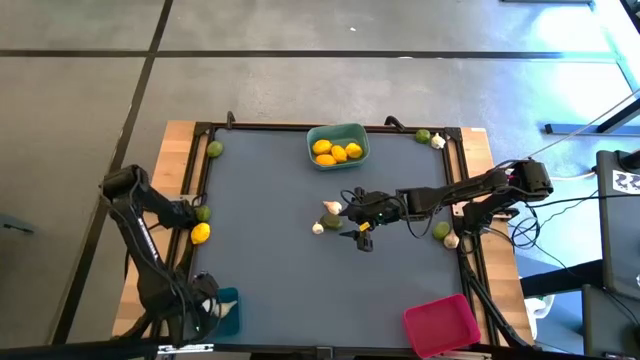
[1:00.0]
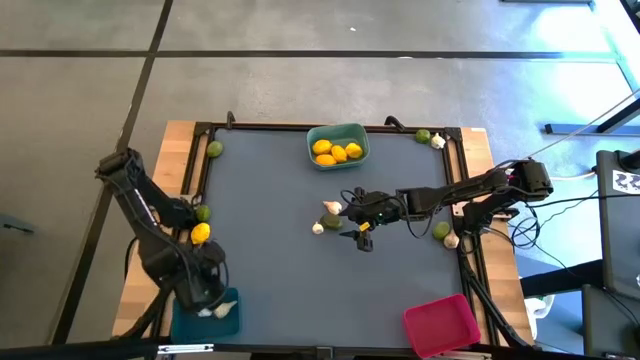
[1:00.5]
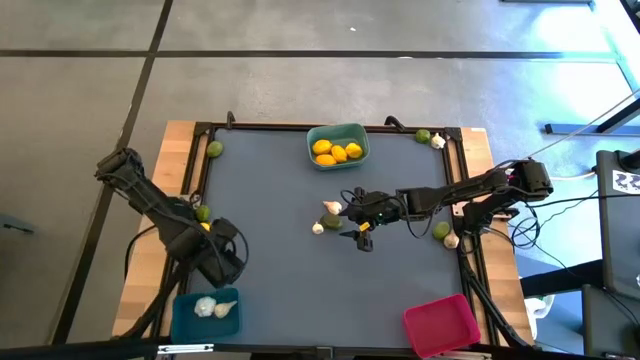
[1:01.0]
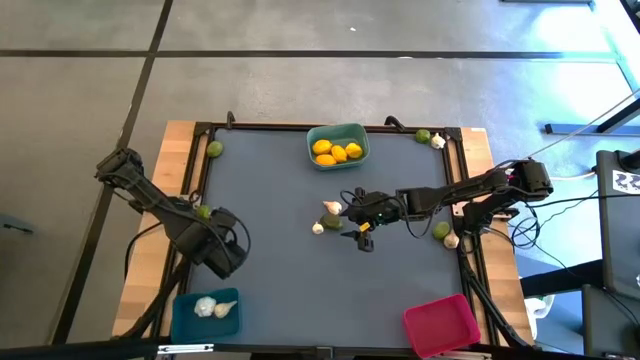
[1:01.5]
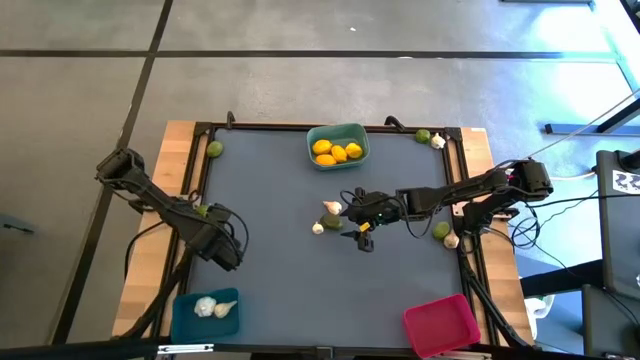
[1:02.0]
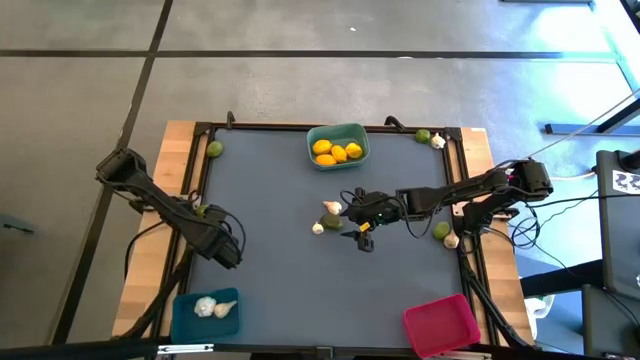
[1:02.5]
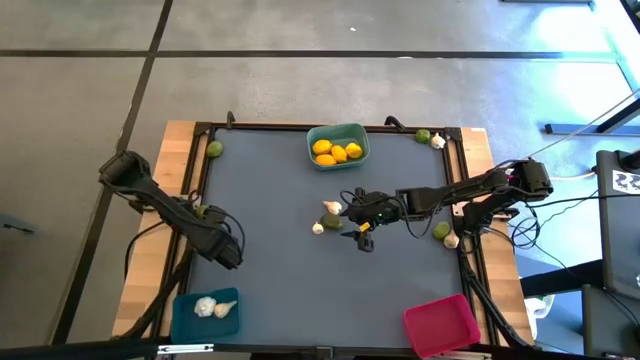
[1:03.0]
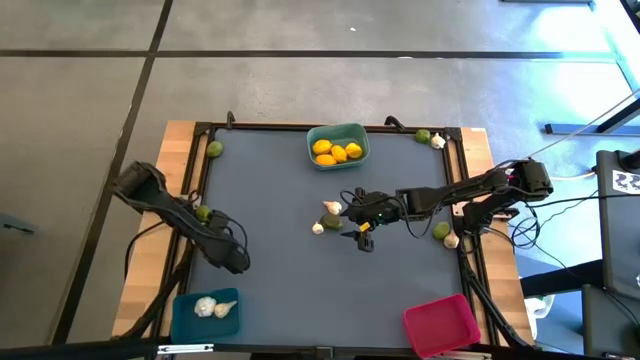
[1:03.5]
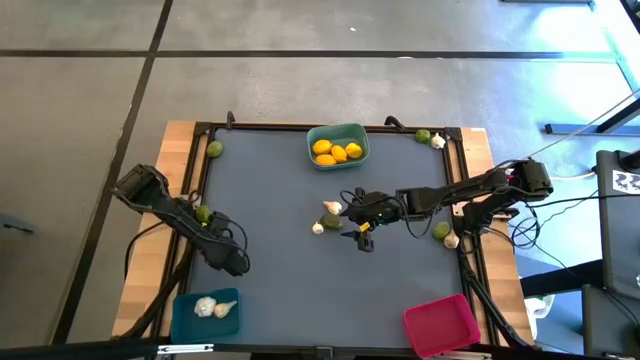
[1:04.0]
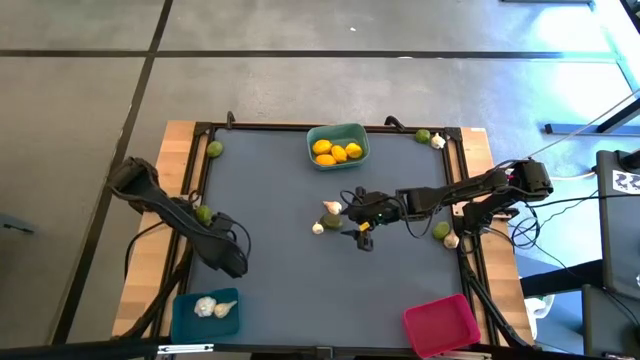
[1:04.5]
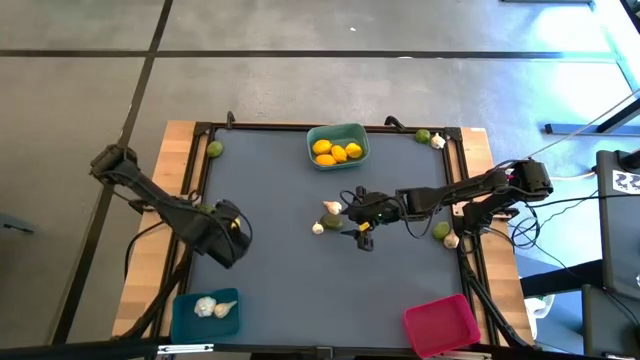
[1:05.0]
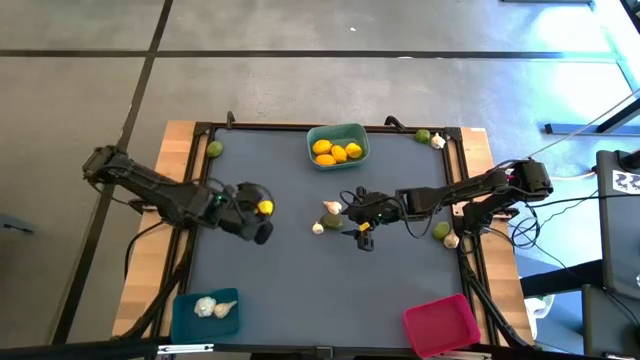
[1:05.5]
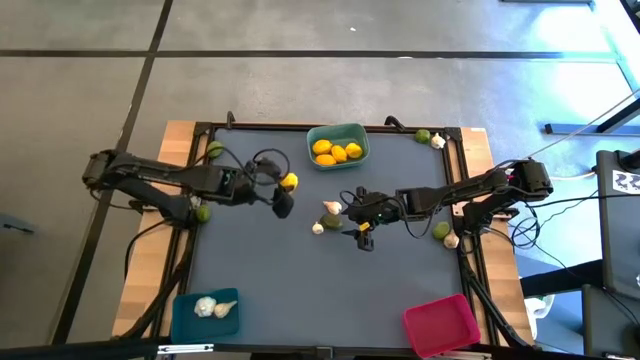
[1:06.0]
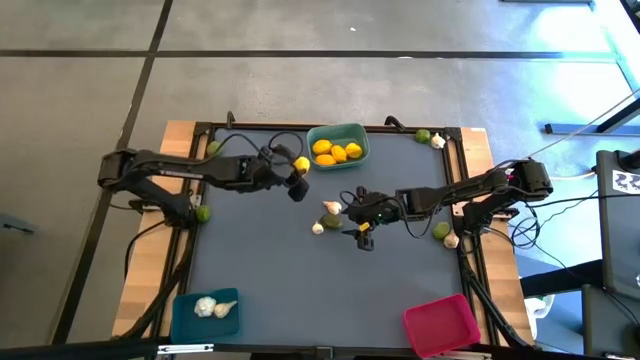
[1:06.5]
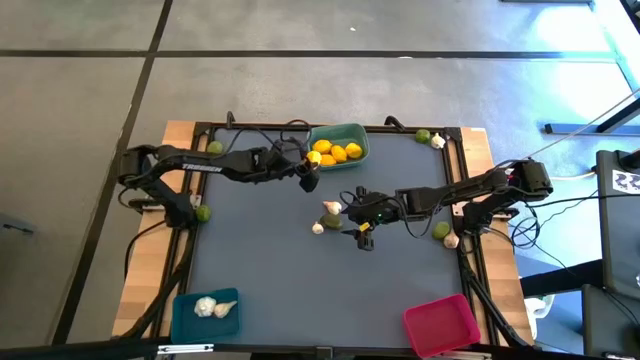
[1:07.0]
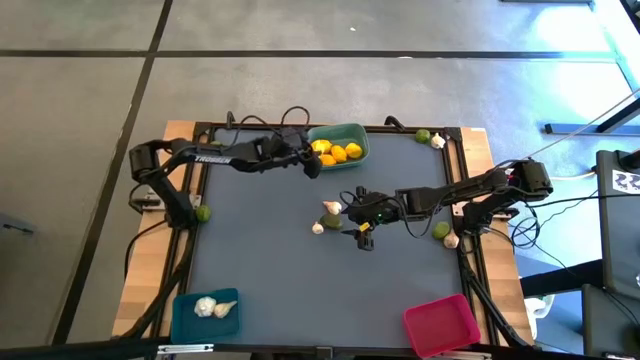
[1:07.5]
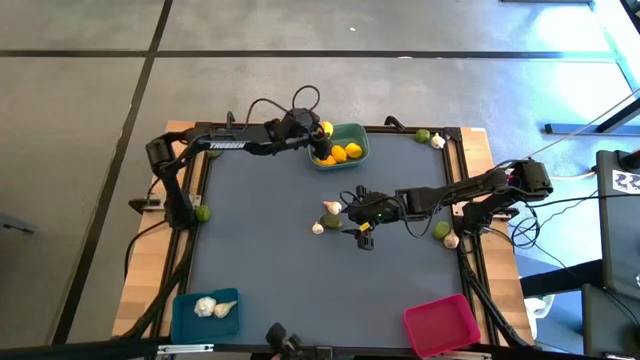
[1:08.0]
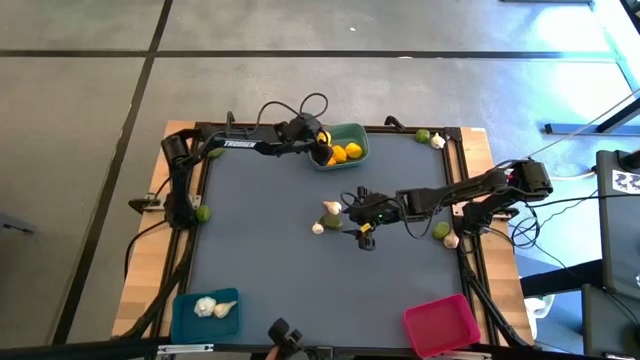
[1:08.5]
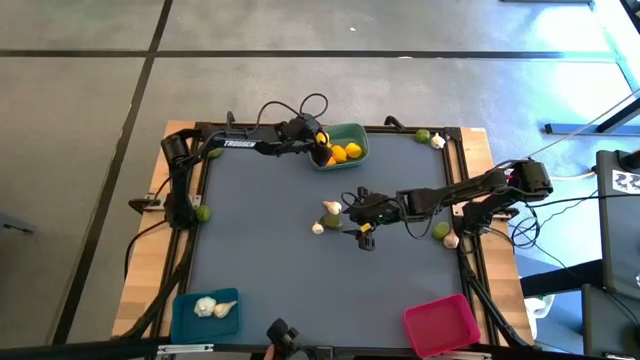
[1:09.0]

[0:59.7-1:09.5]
Task: Sort produce into baskets
Put the green lemon into the green bin

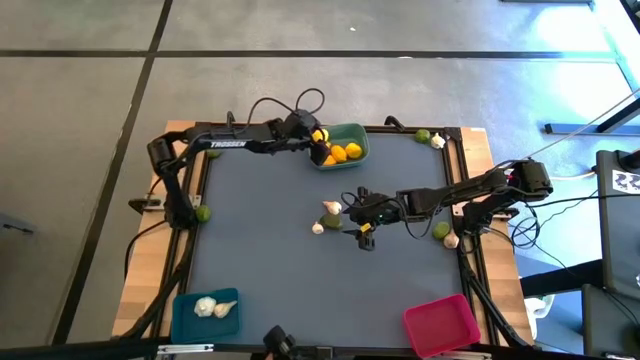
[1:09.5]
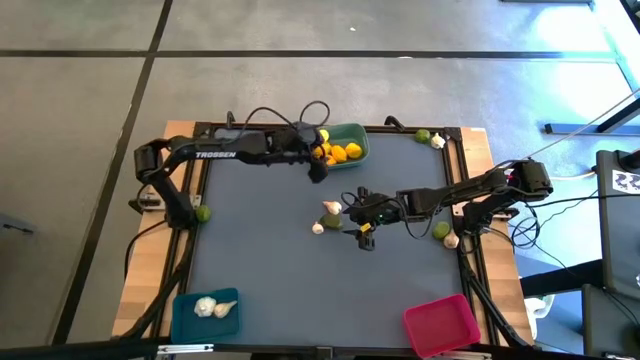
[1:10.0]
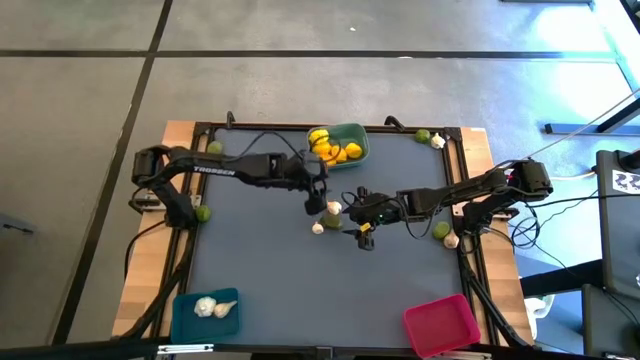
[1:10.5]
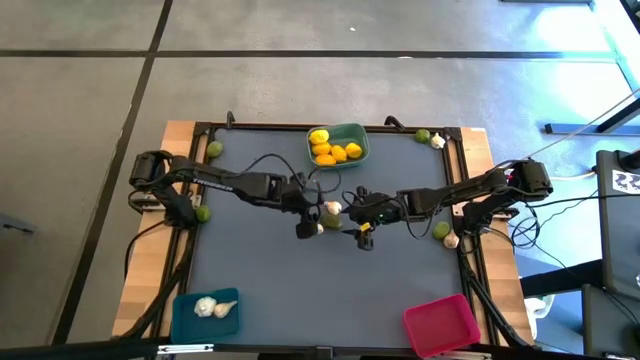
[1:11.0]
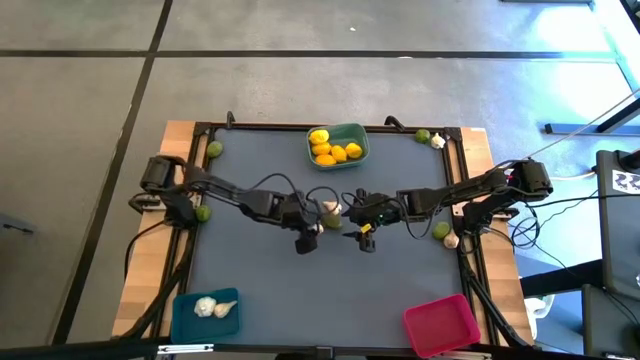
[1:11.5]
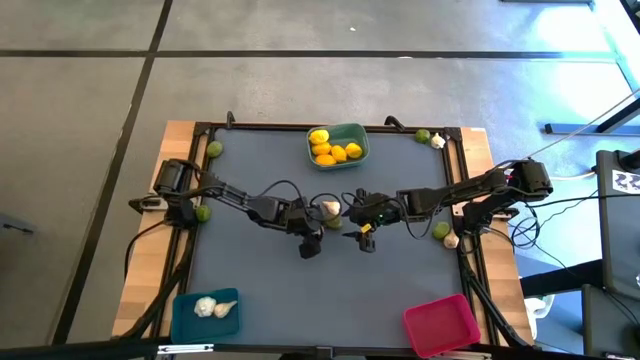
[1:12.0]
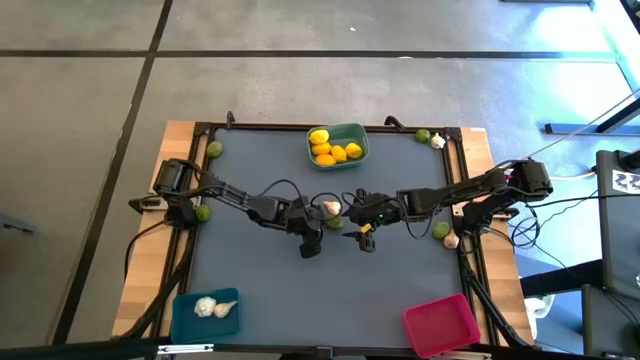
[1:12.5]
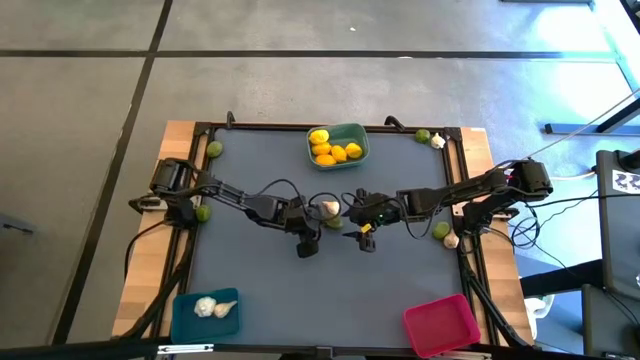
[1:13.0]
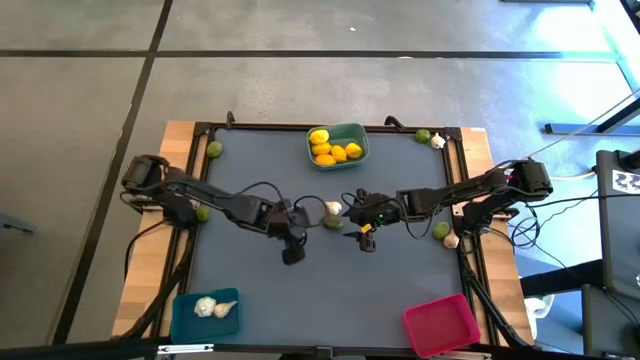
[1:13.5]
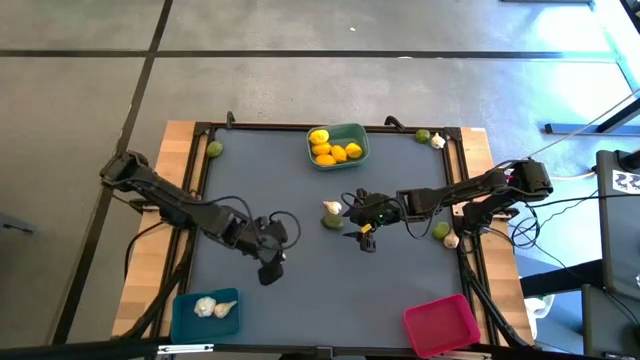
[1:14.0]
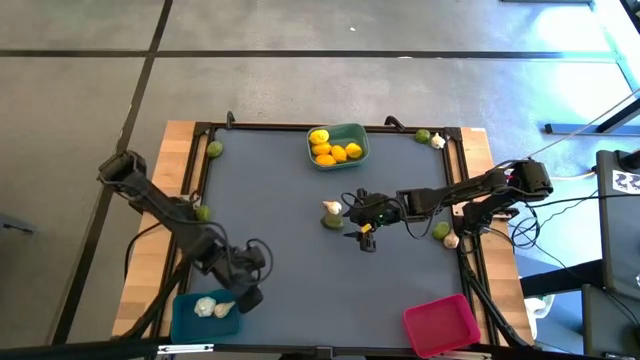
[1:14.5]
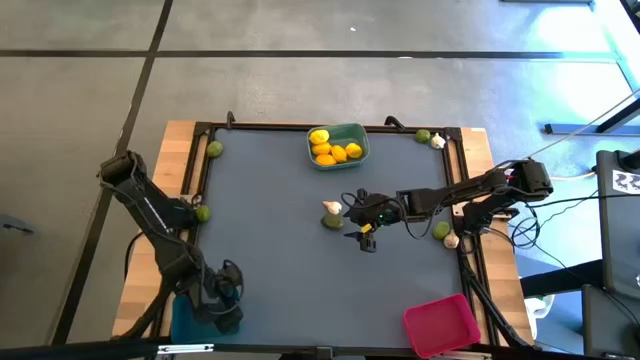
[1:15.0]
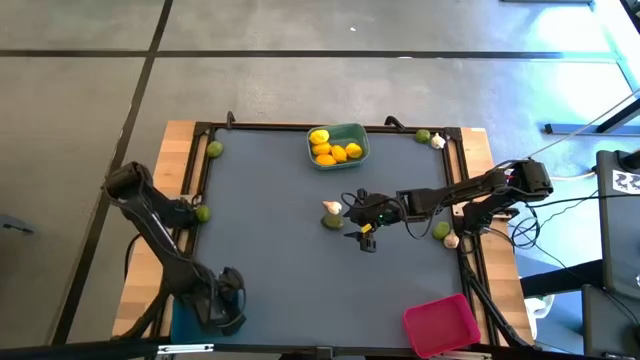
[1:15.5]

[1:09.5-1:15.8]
Put the white garlic into the blue bin

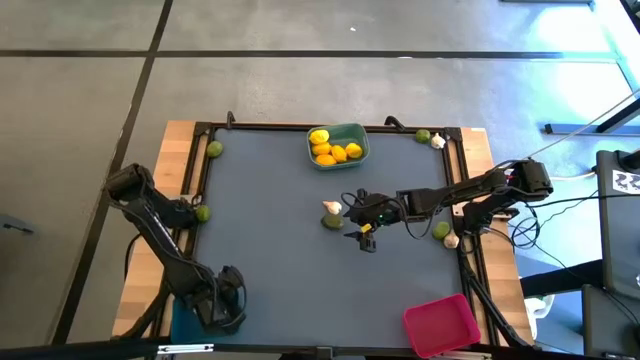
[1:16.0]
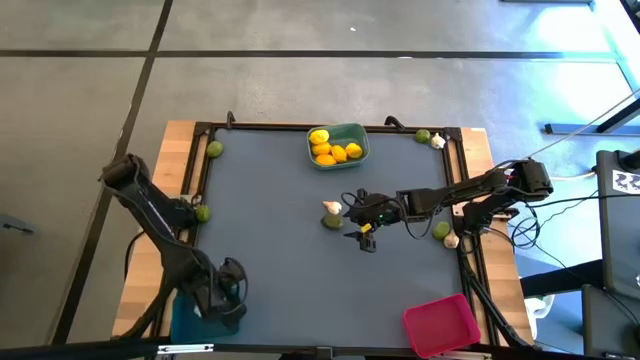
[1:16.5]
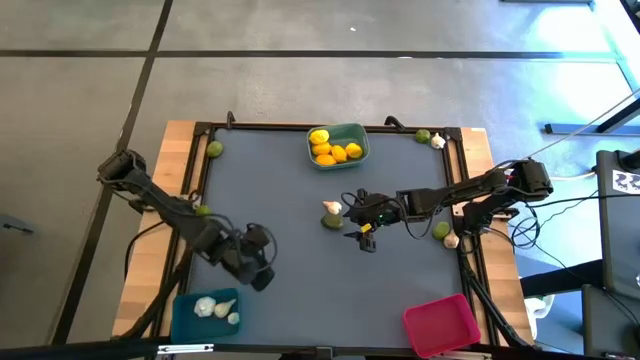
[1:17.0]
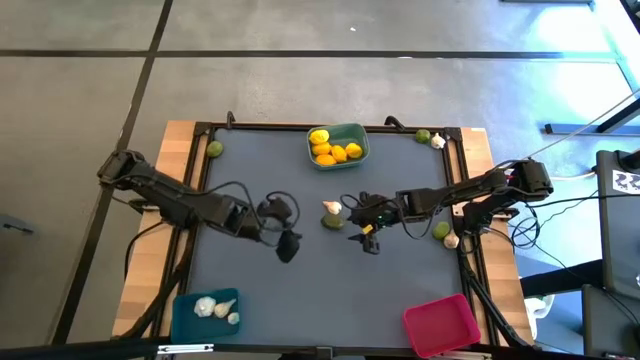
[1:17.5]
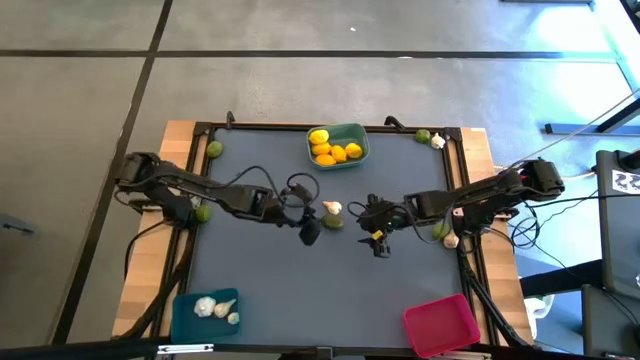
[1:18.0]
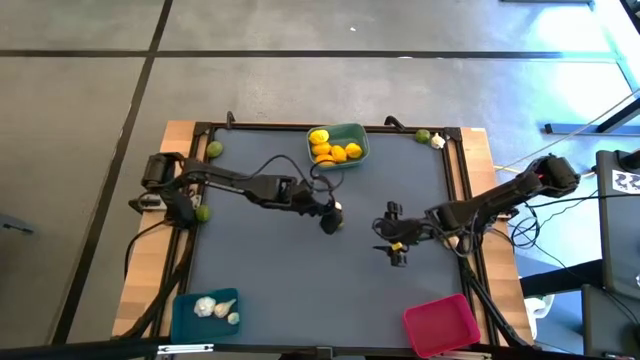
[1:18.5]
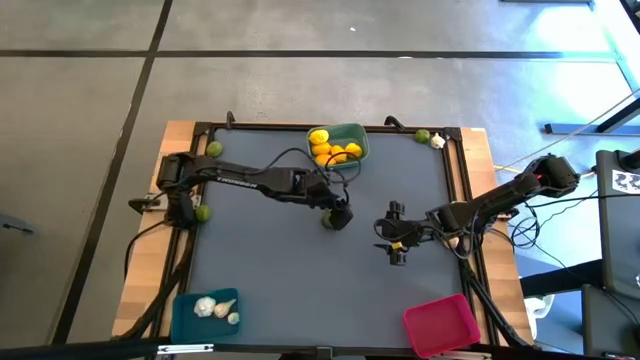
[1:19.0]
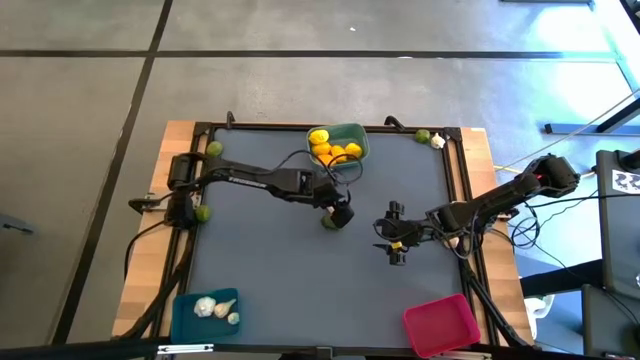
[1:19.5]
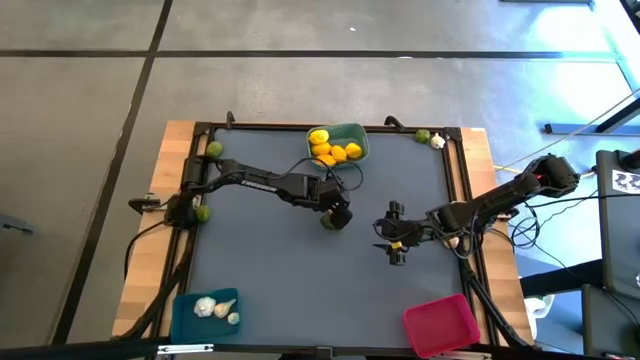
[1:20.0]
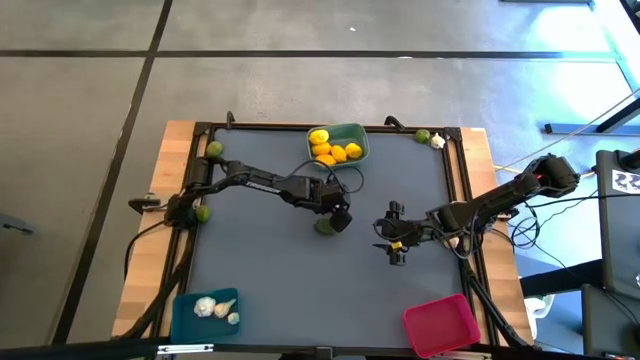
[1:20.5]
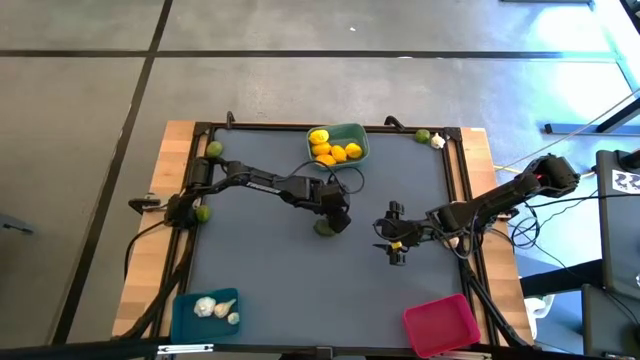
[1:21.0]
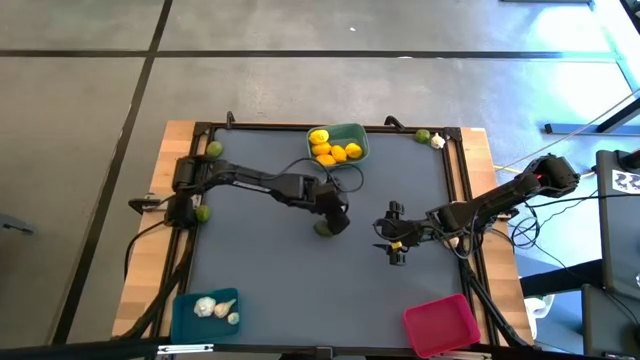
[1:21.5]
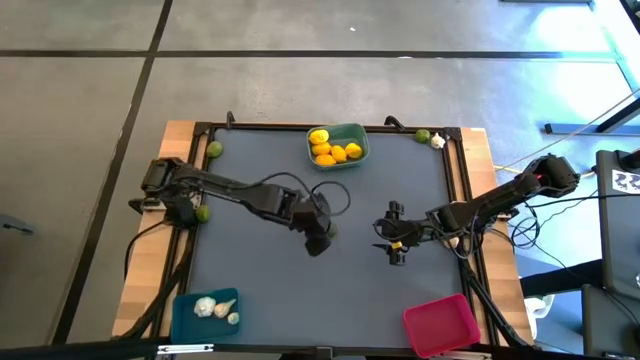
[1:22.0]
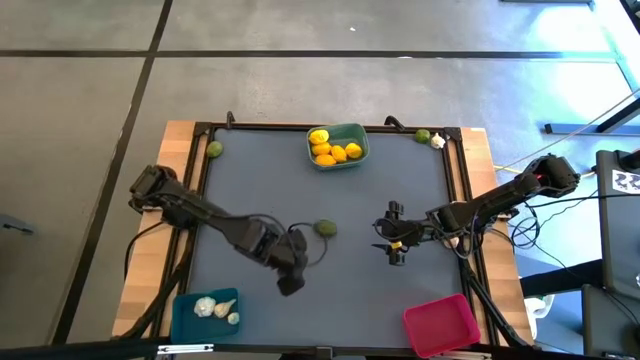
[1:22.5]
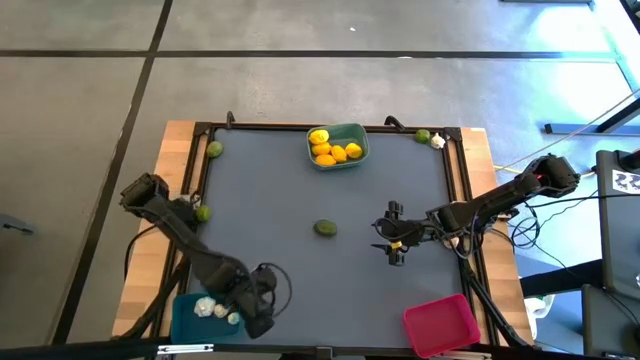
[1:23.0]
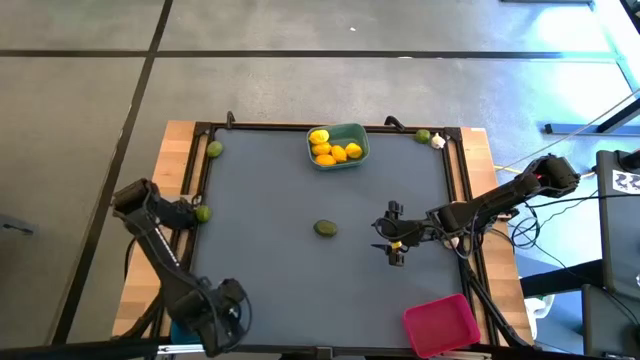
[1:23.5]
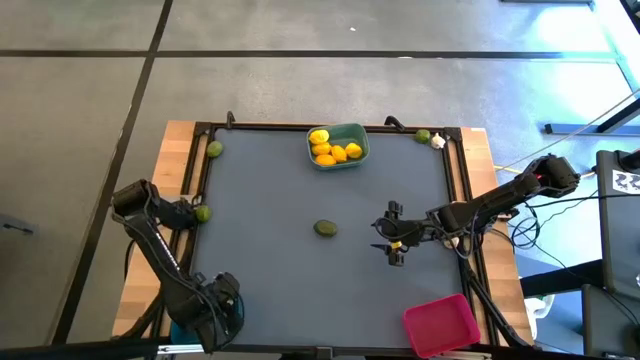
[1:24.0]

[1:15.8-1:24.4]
Put the white garlic into the blue bin
